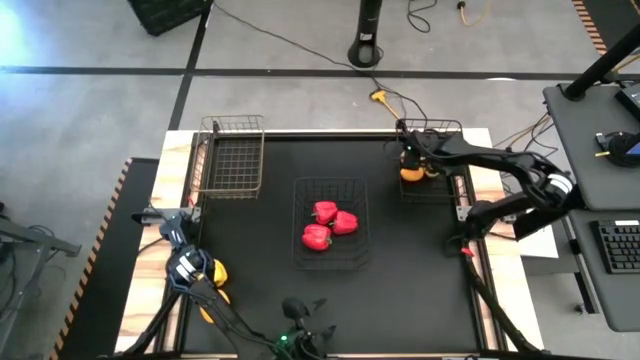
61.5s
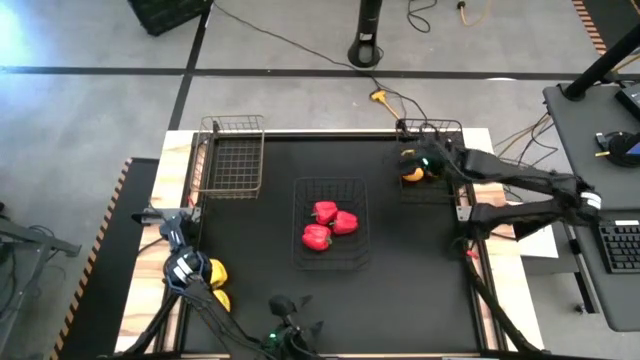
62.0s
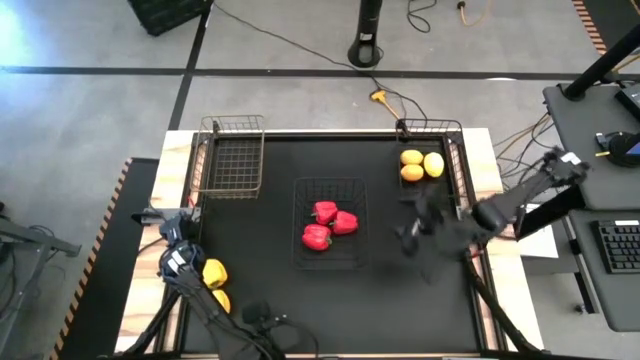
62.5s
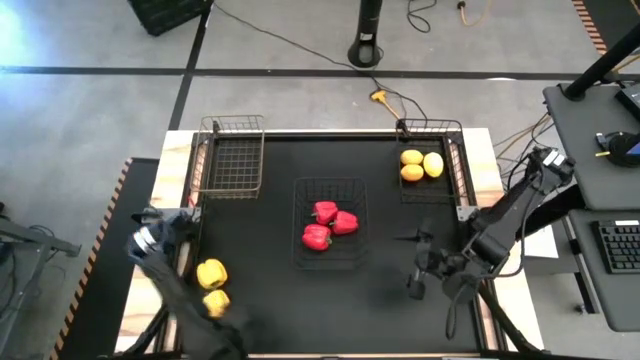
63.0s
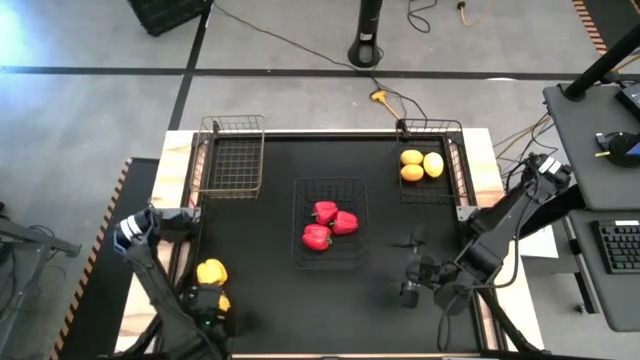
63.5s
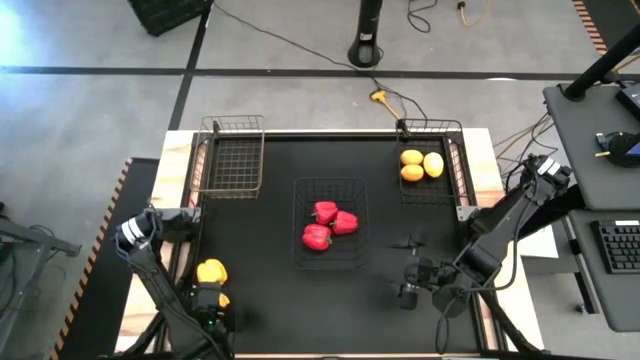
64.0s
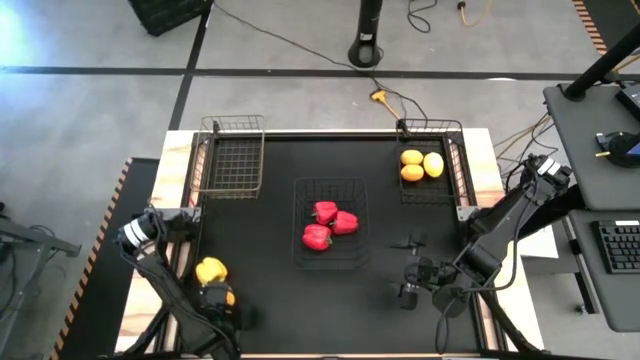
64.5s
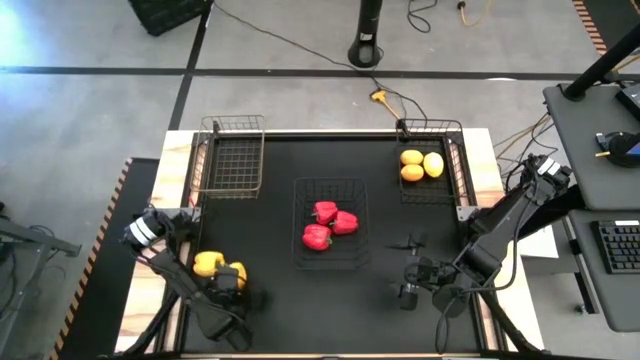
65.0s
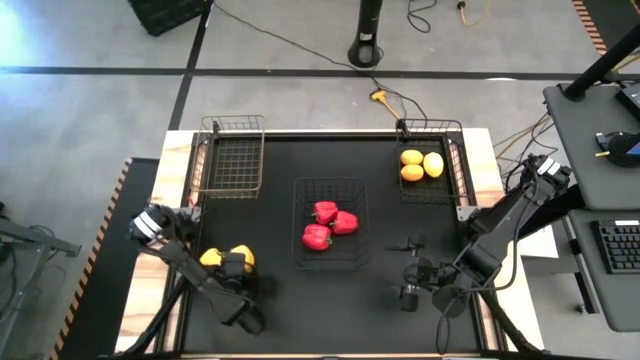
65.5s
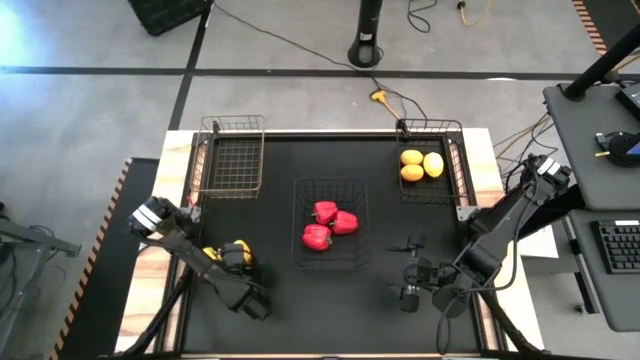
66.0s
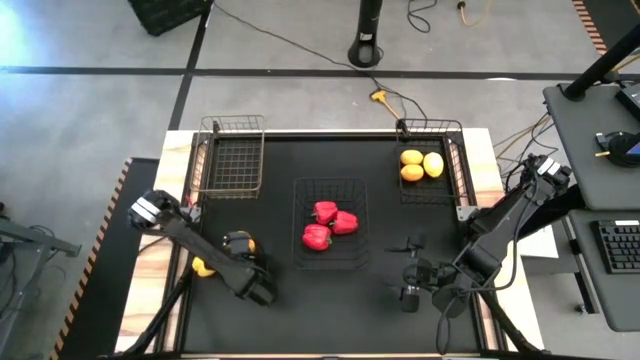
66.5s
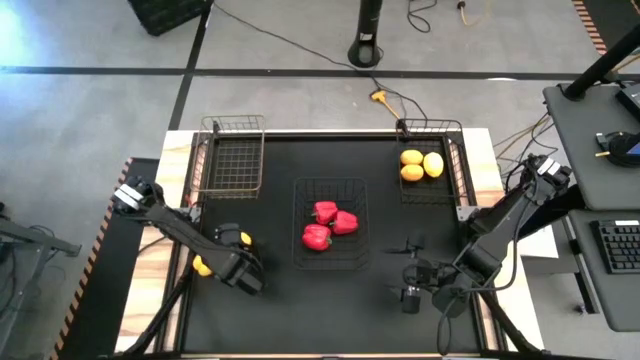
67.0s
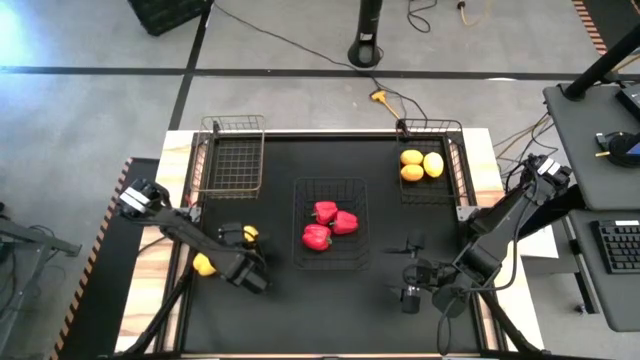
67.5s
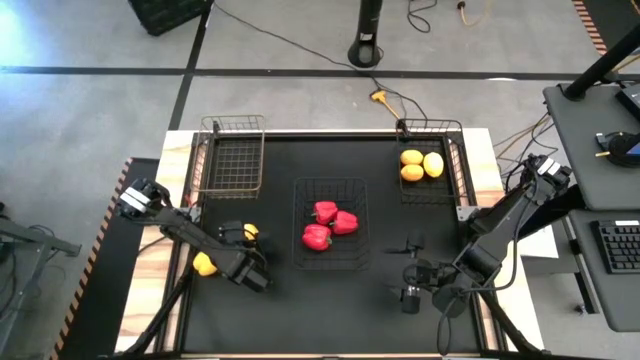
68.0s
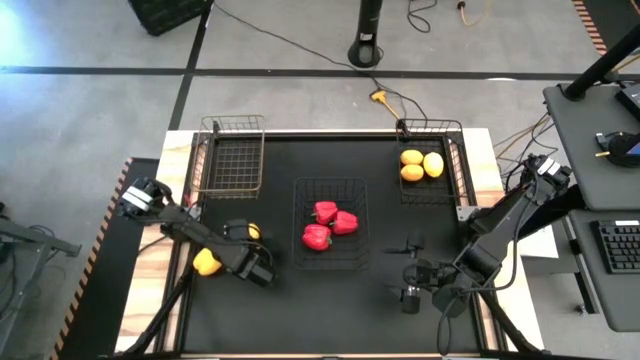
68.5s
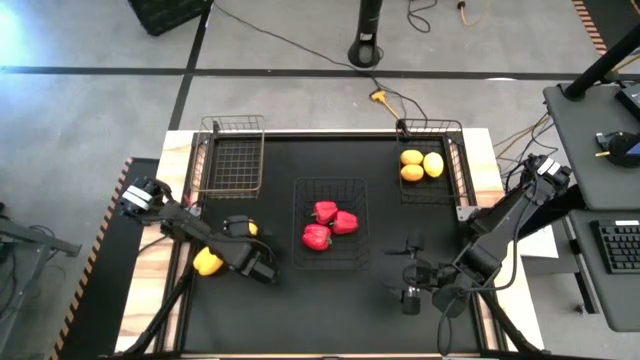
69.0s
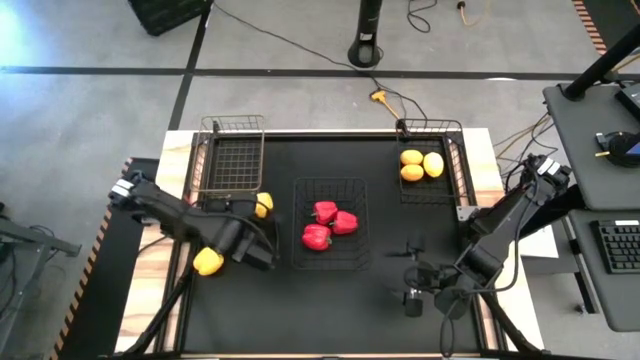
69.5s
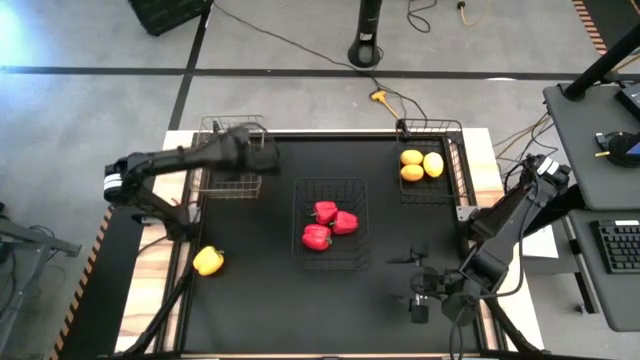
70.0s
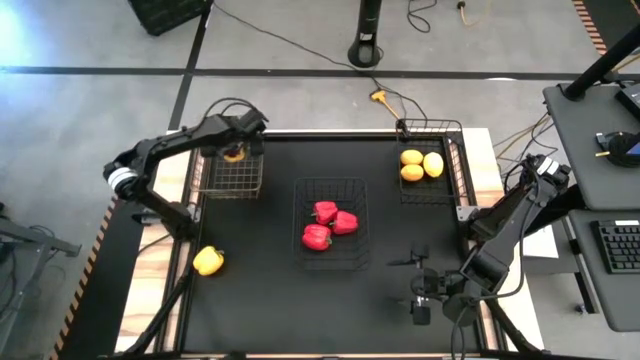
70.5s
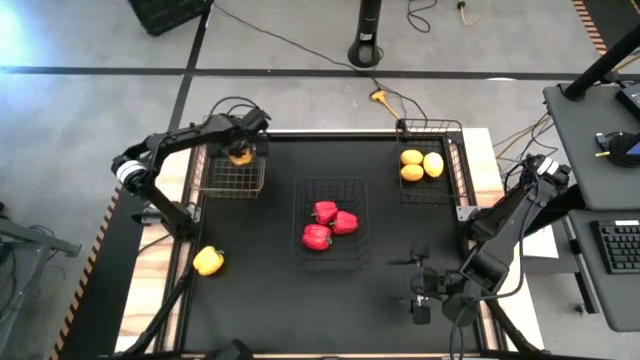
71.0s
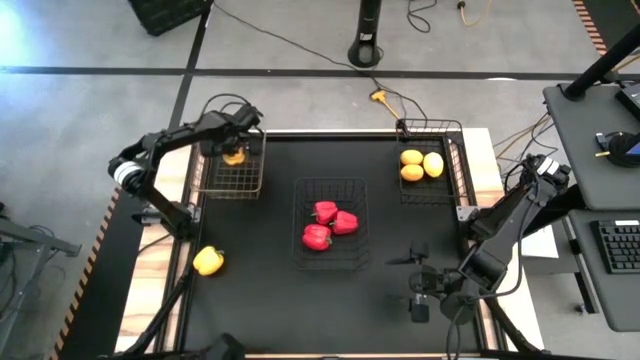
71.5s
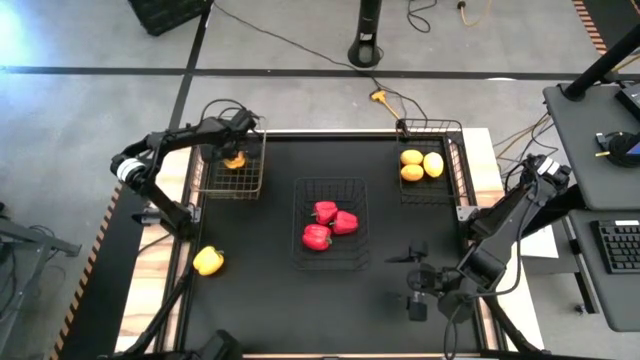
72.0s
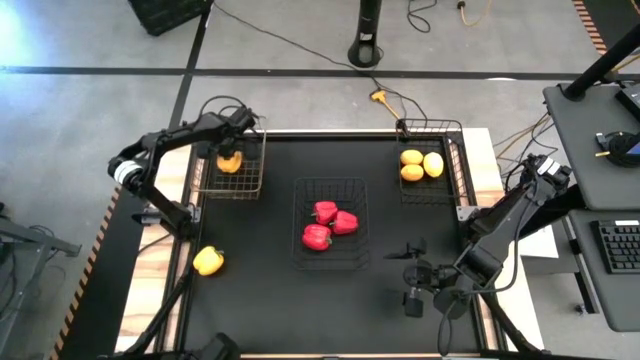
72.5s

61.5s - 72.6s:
Task: Sort produce into baskets
Put the bottom yellow bell pepper into the left wire basket

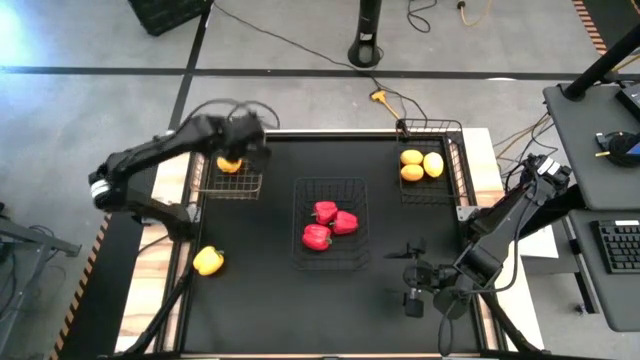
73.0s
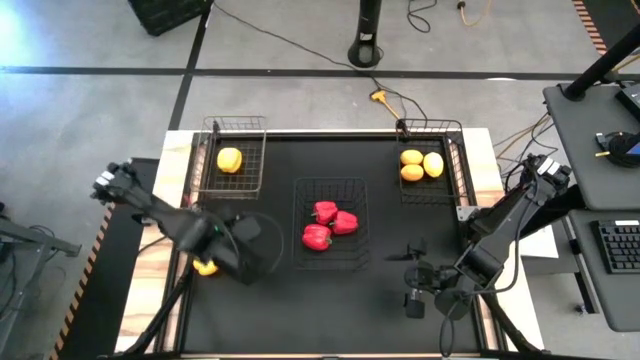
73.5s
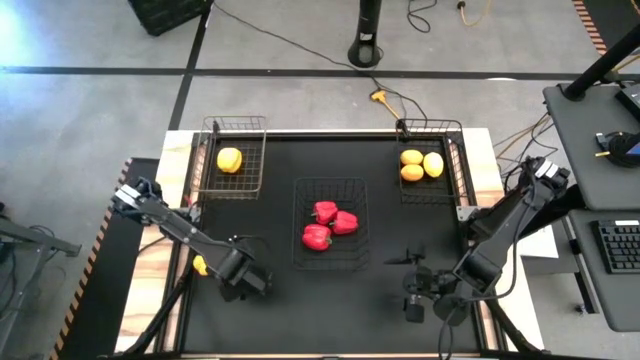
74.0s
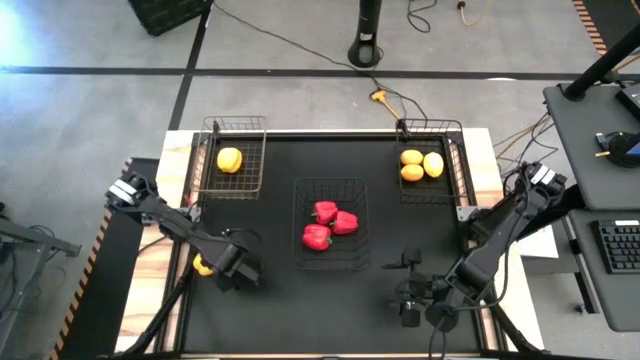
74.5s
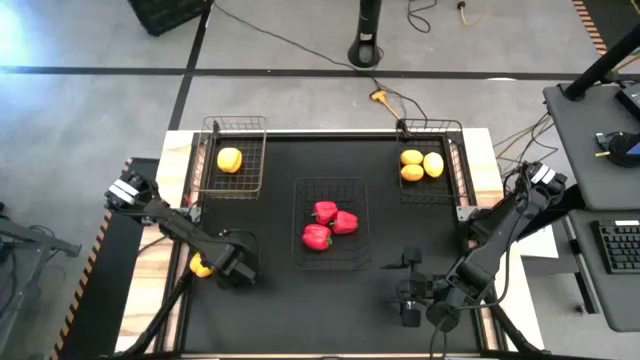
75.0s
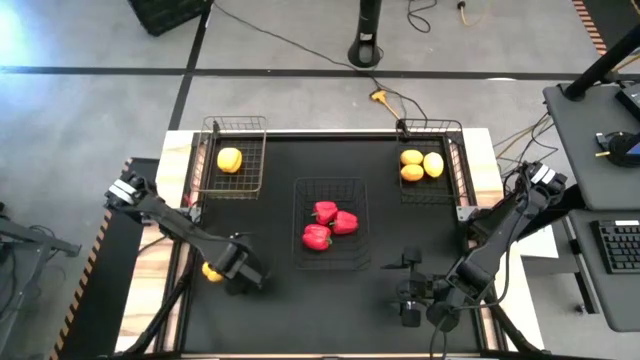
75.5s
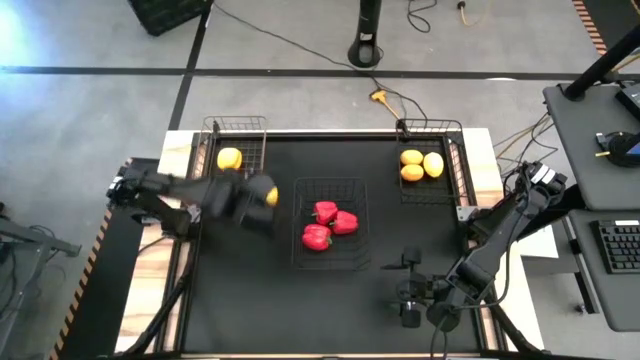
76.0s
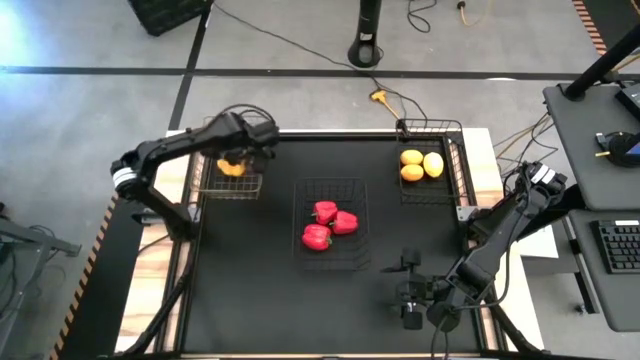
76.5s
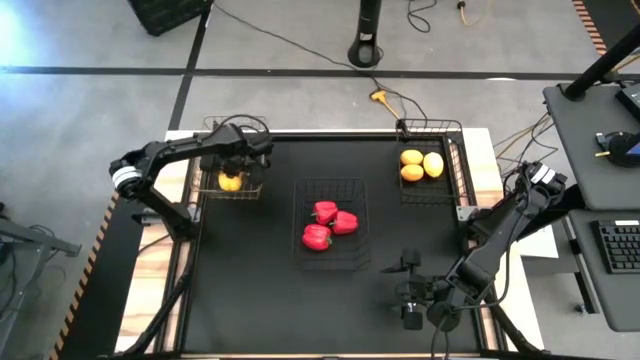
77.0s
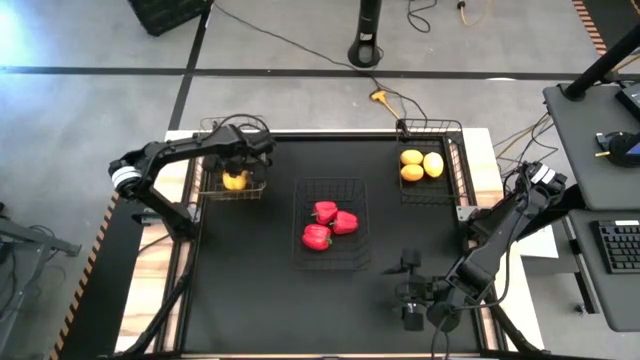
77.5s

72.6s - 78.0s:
Put the yellow bell pepper into the left wire basket

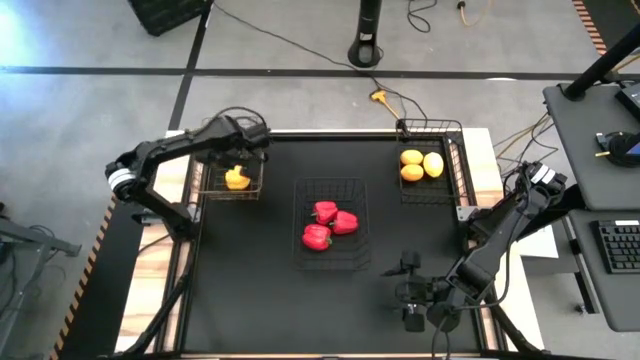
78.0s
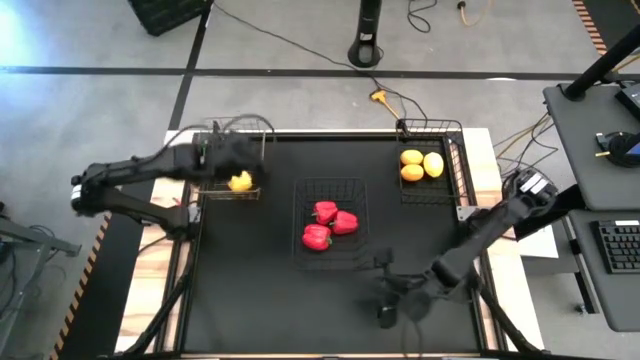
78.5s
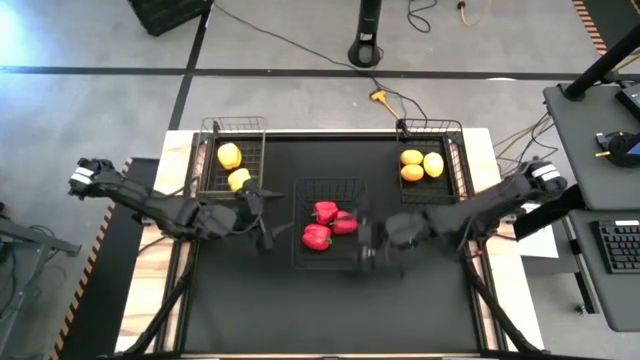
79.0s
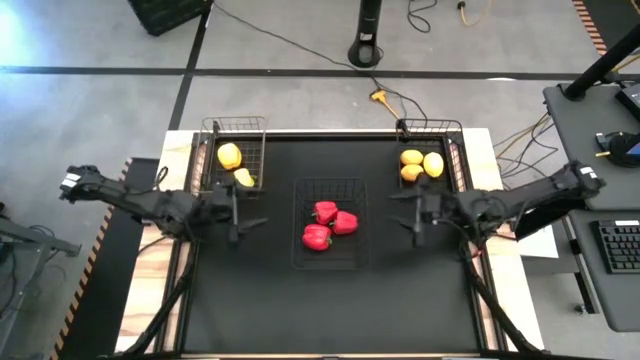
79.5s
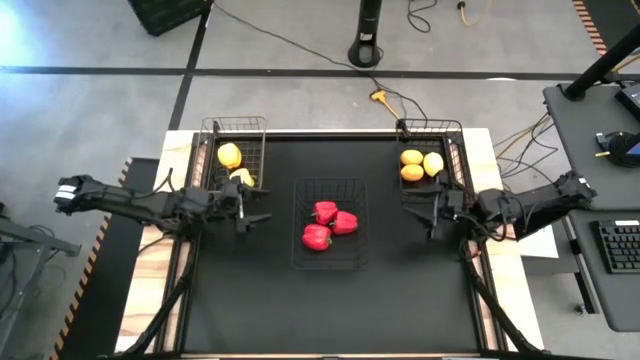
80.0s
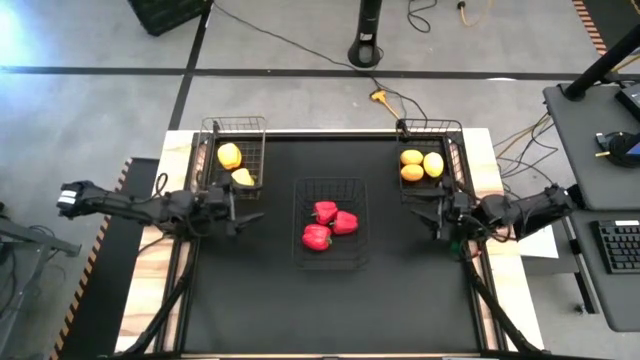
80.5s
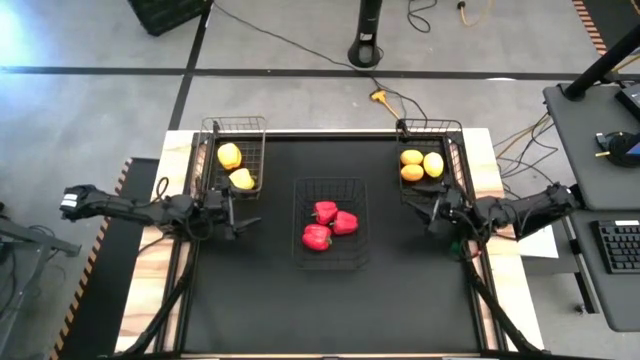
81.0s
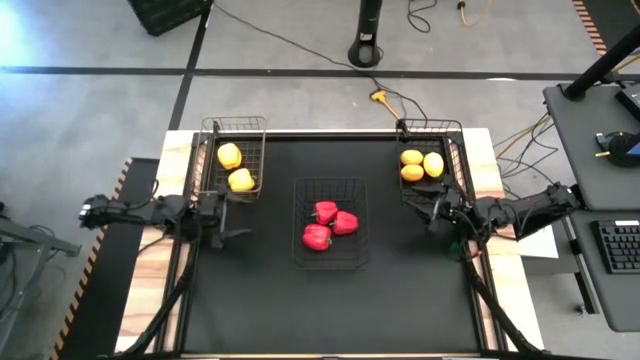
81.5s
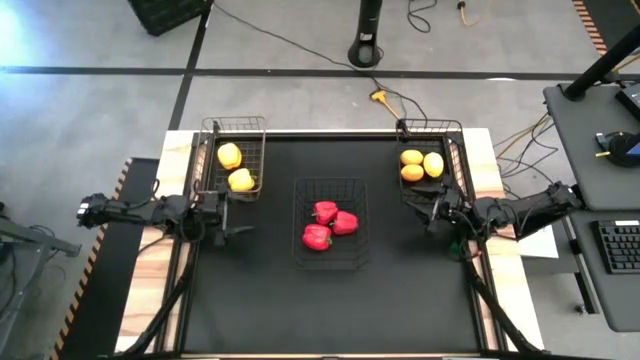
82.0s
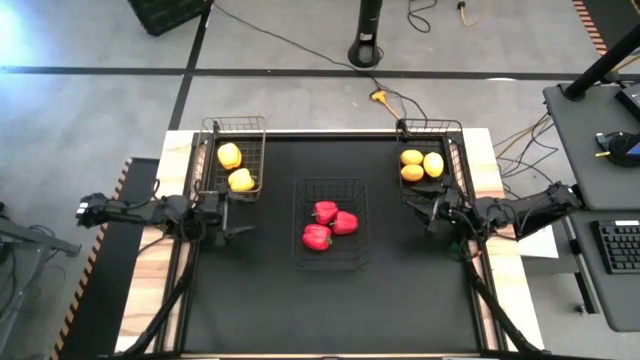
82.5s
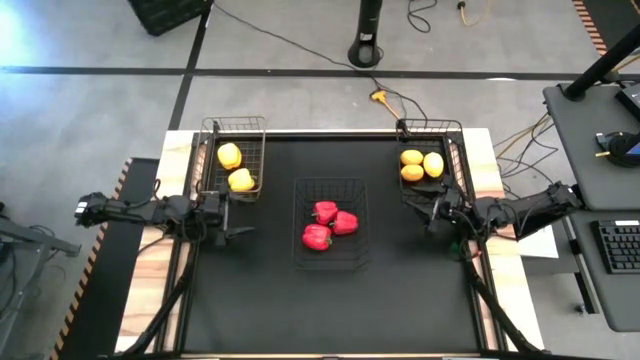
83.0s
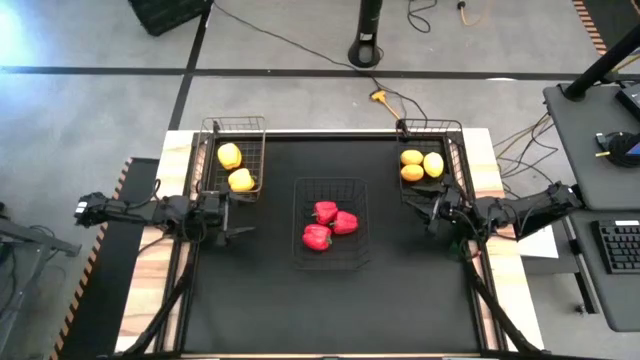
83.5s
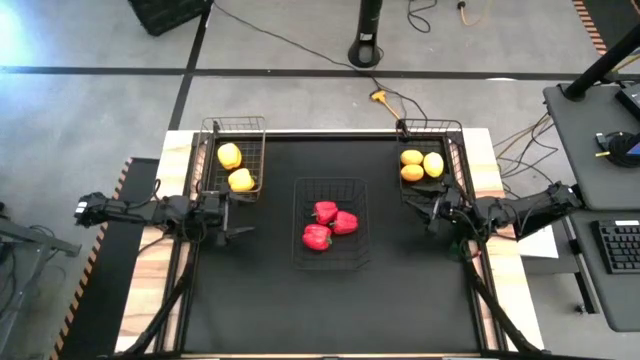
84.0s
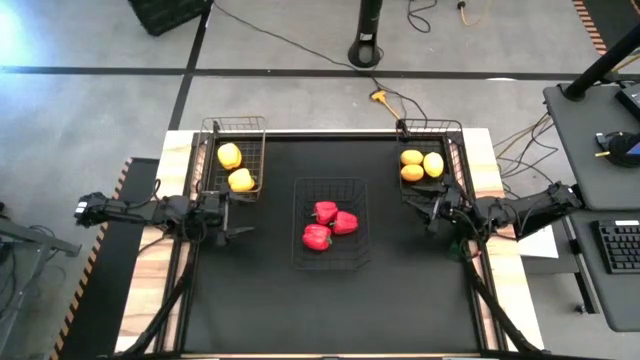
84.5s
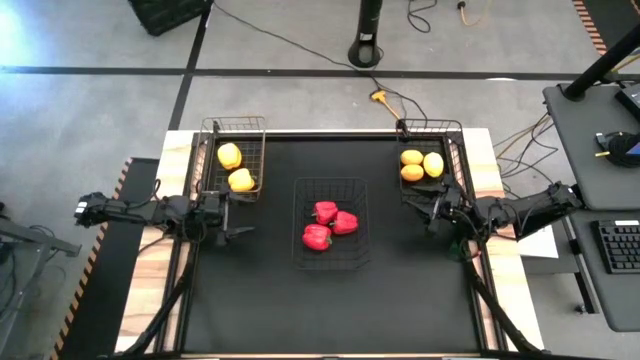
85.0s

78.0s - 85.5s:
Return to Home Position
